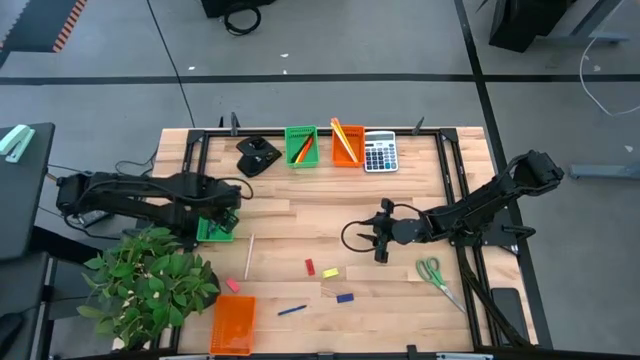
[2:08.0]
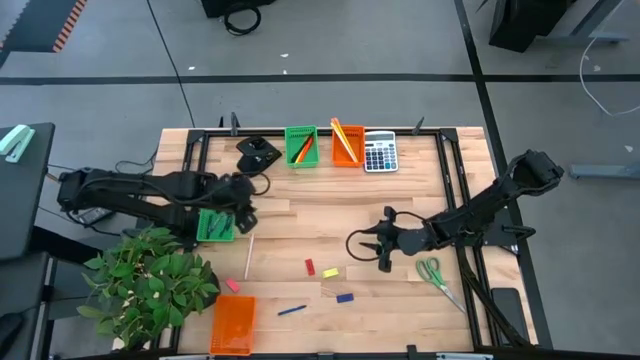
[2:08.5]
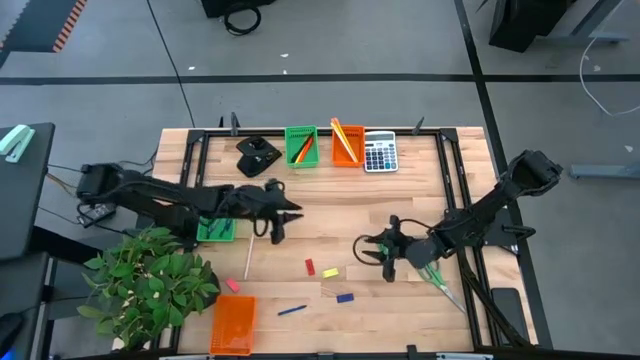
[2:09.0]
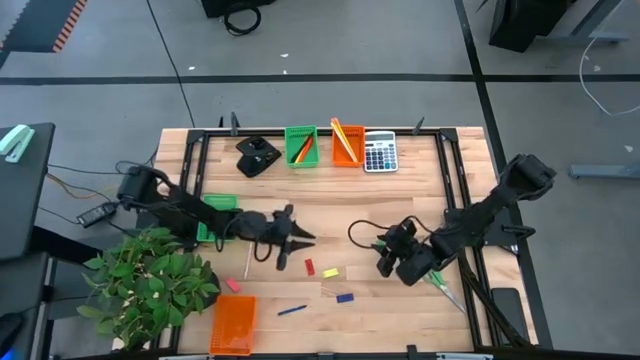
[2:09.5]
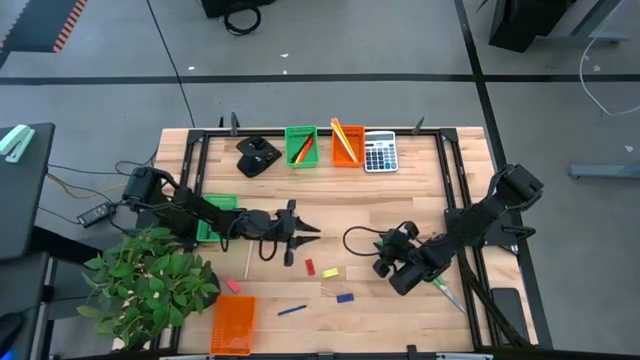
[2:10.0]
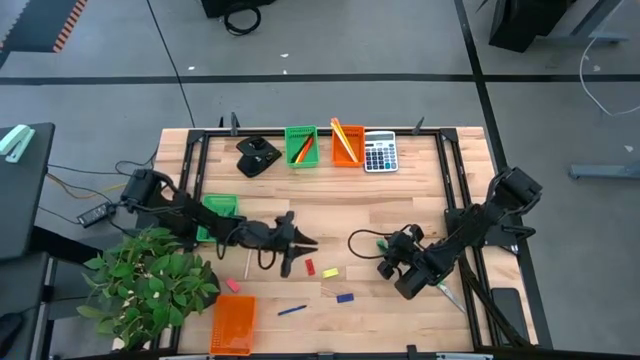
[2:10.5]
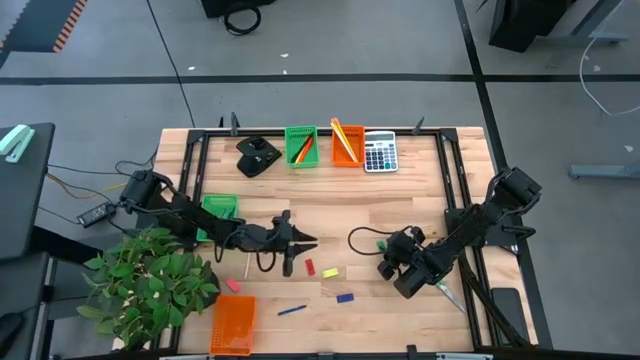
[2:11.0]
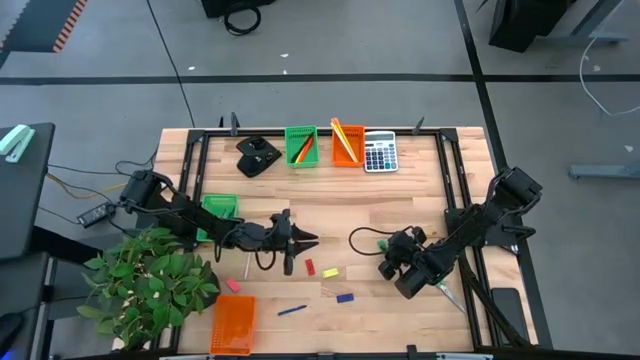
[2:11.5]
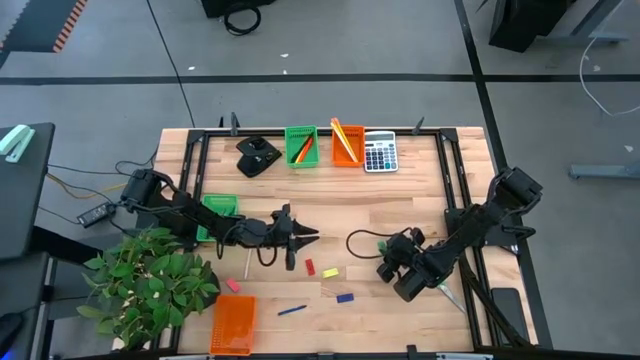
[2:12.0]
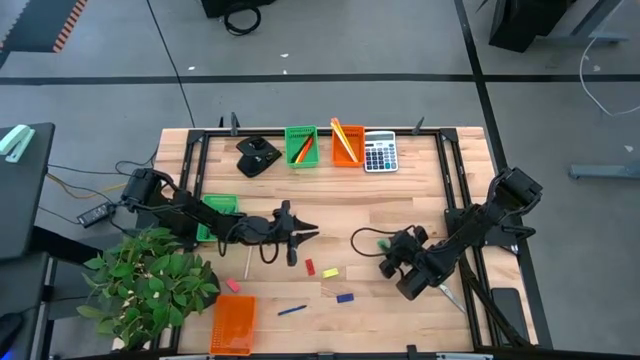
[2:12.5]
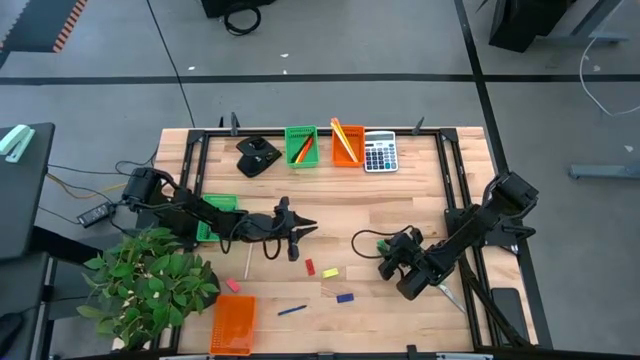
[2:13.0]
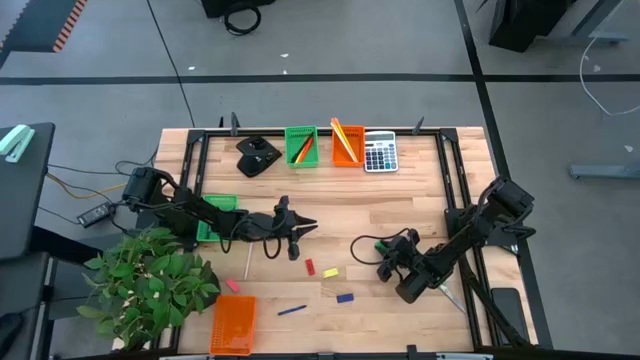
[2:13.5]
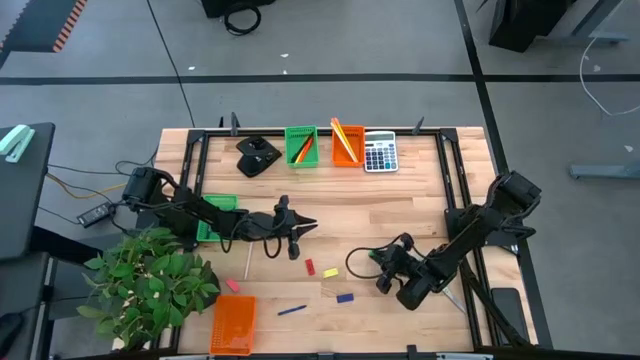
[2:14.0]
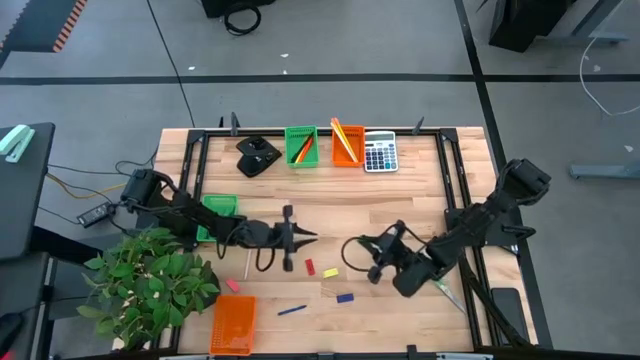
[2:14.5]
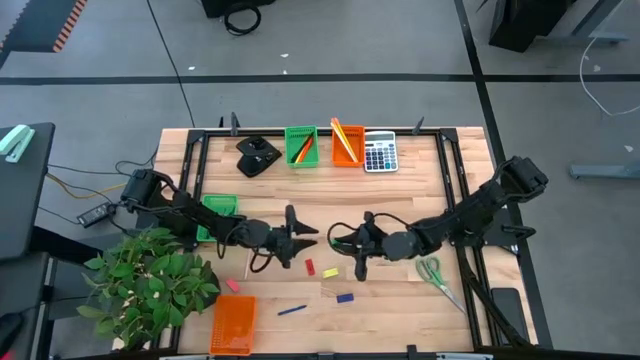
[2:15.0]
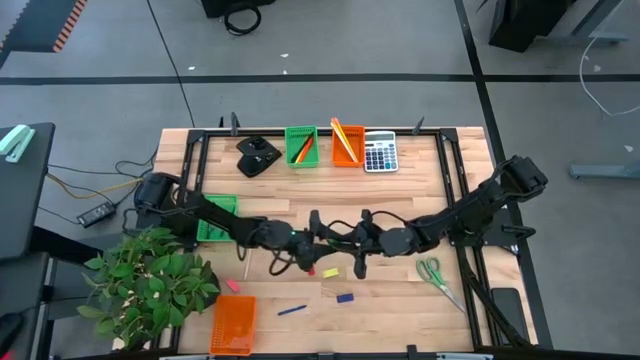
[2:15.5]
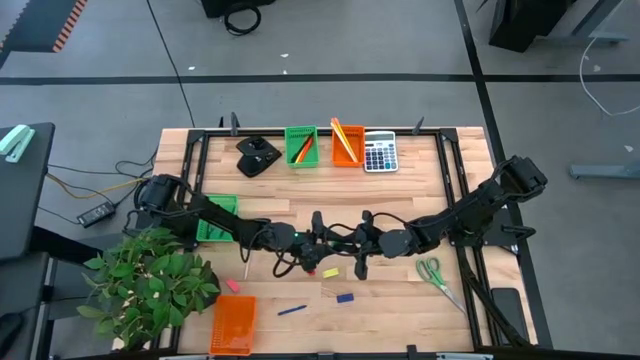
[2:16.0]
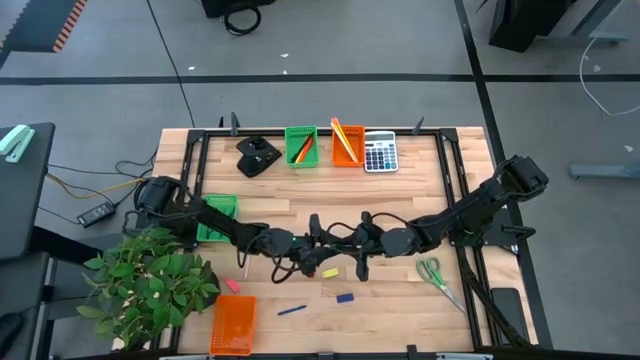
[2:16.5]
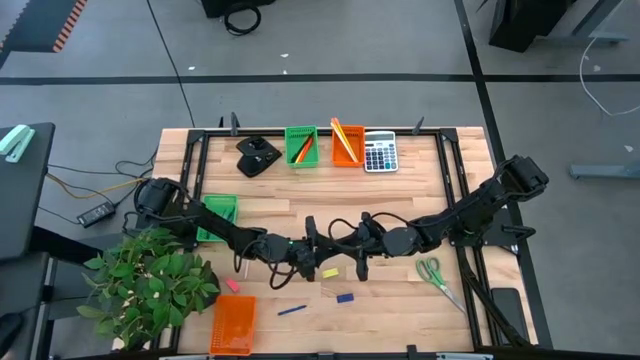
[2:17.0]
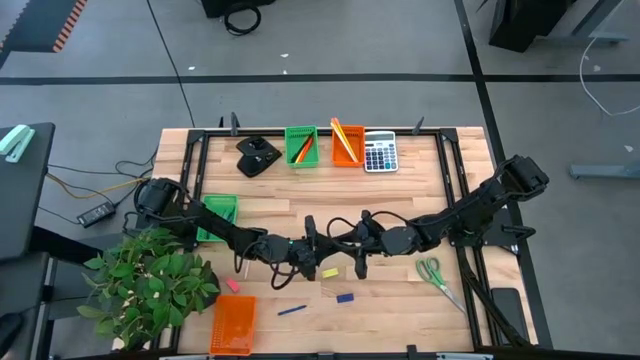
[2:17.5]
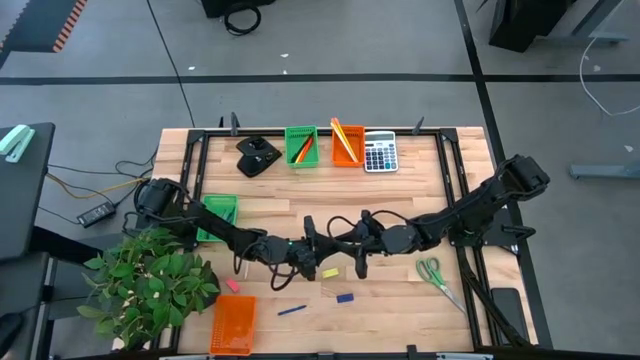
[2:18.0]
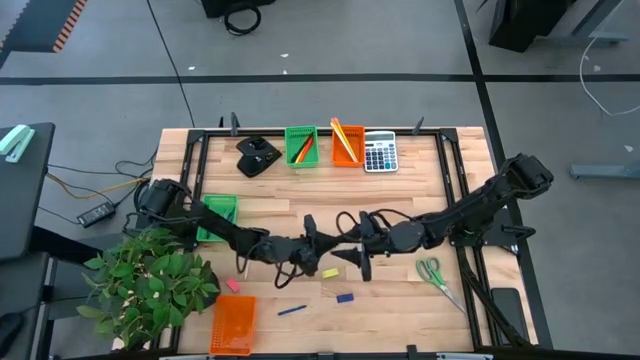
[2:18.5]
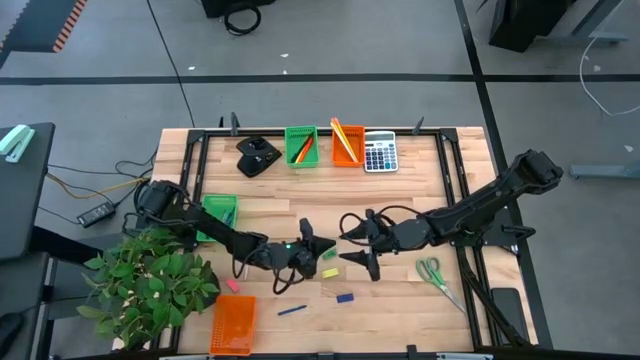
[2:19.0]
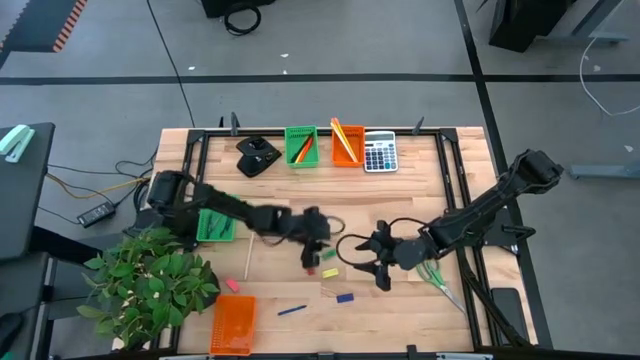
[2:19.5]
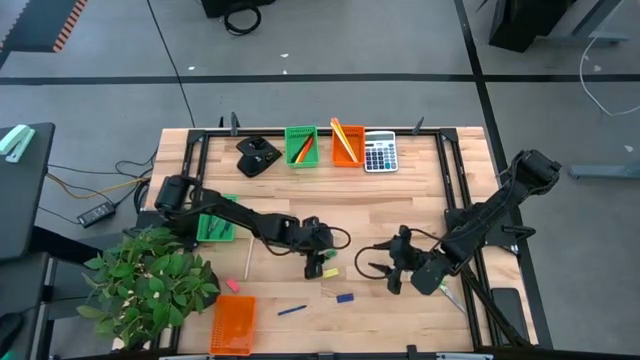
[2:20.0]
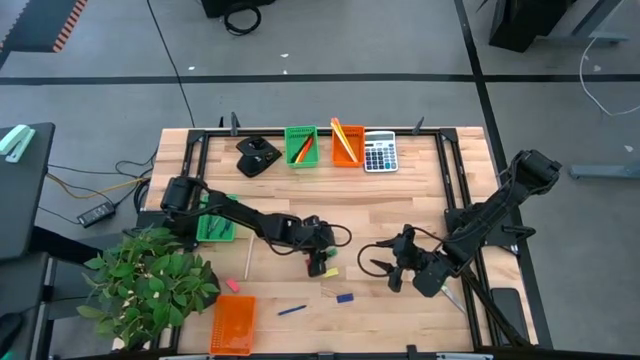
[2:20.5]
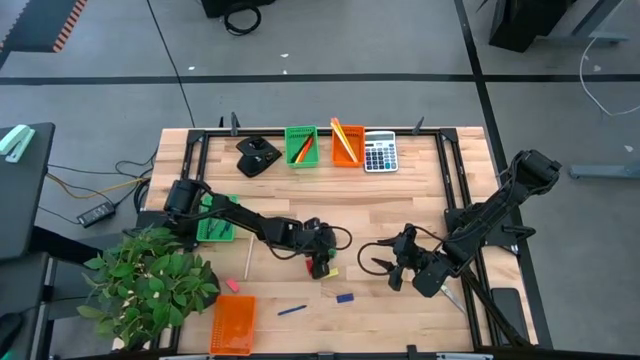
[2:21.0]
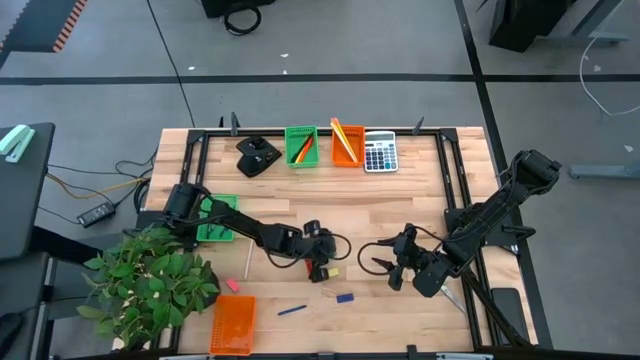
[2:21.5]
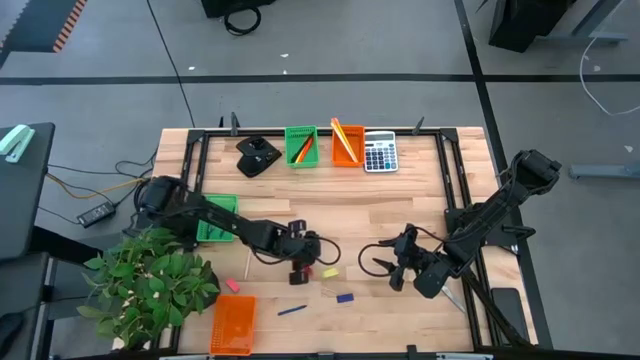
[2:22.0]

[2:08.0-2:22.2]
Task: Sort crayons/erasers/pens/pencils in bins
Put the green eraser into the bottom orange bin

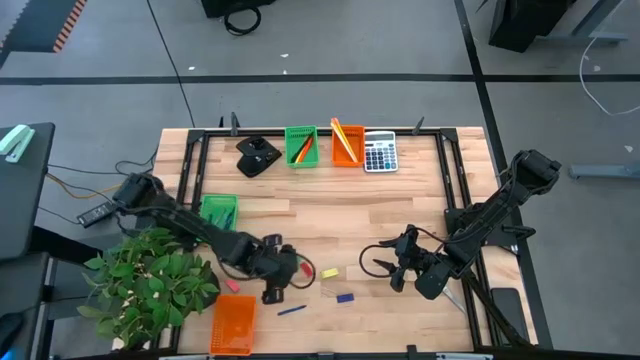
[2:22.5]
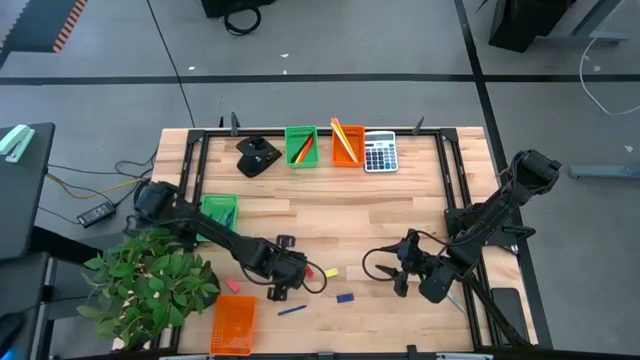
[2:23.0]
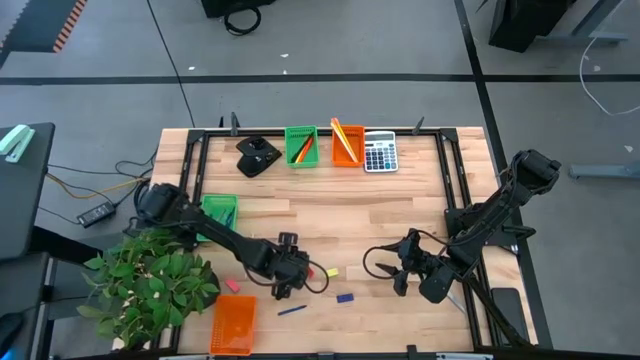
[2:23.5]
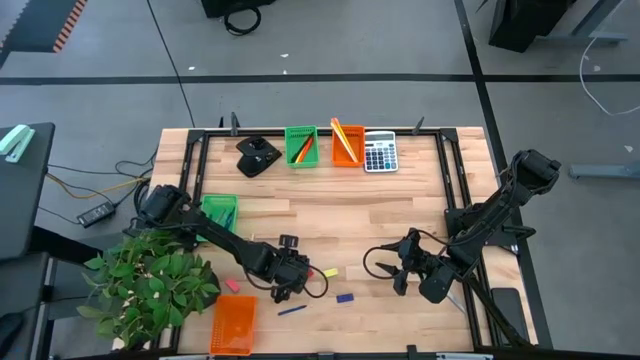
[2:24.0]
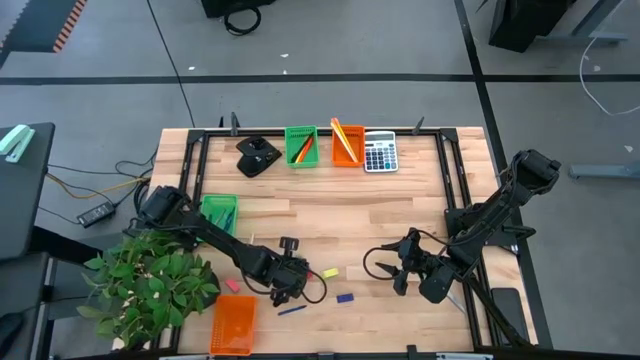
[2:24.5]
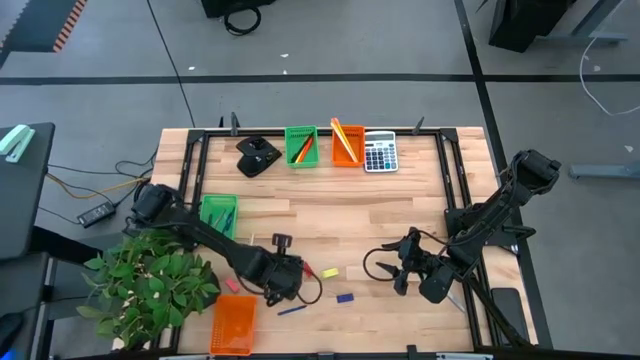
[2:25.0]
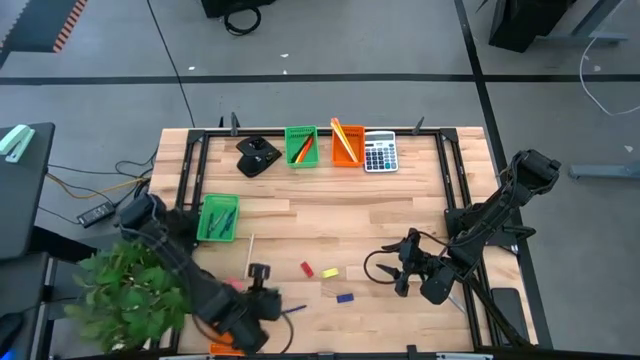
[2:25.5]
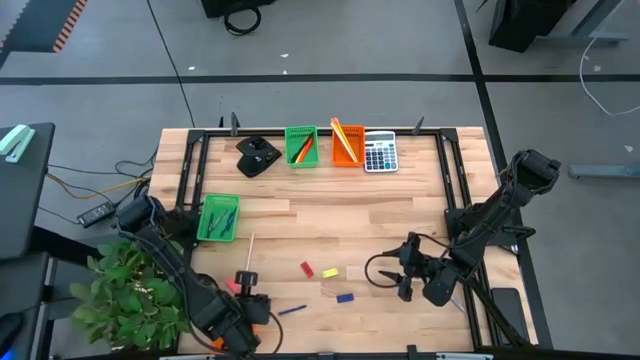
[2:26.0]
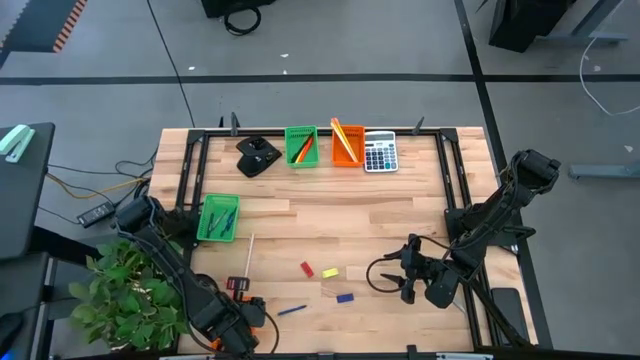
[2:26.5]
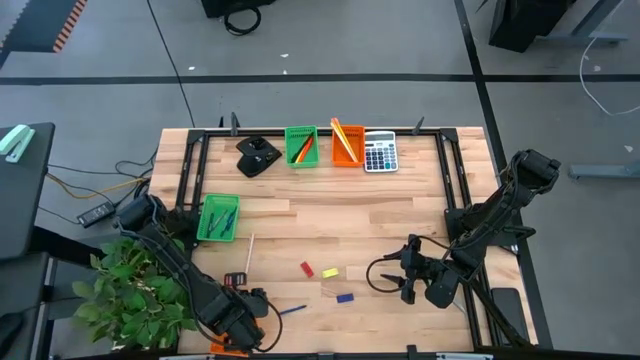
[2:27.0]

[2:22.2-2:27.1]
Put the green eraser into the bottom orange bin
